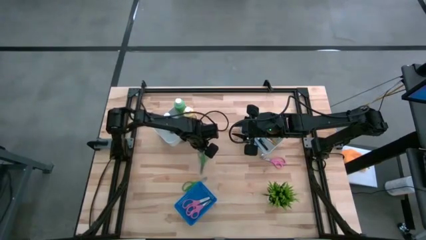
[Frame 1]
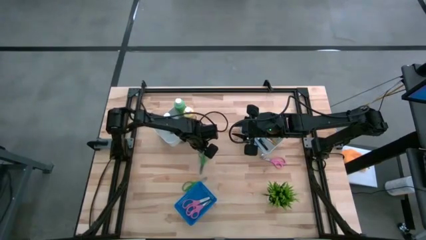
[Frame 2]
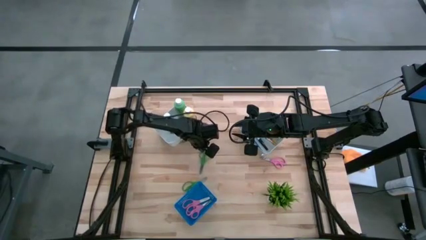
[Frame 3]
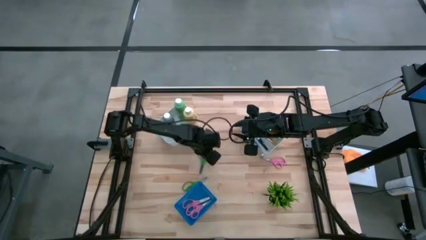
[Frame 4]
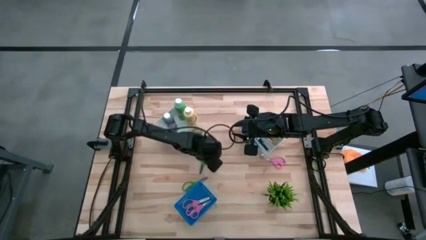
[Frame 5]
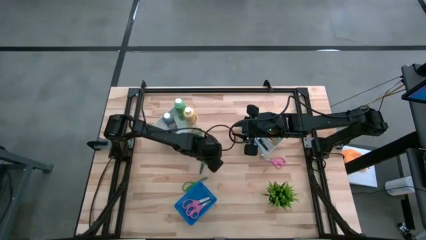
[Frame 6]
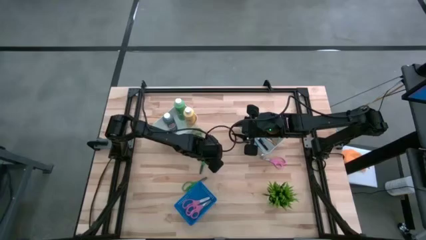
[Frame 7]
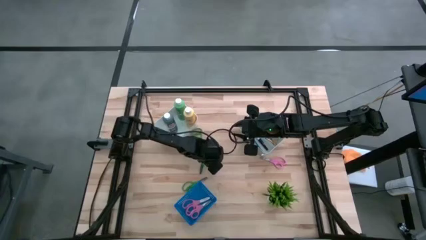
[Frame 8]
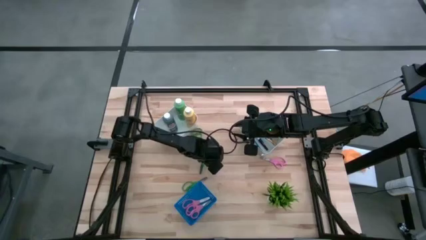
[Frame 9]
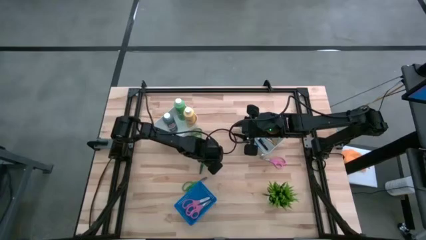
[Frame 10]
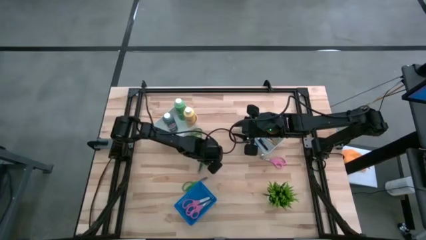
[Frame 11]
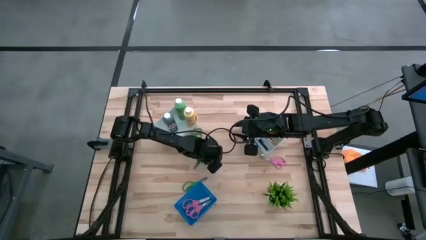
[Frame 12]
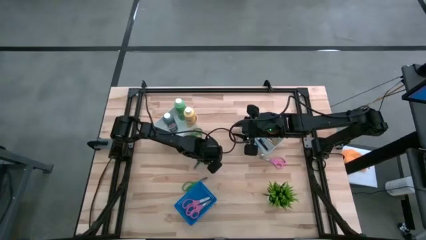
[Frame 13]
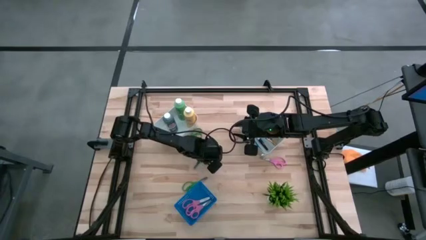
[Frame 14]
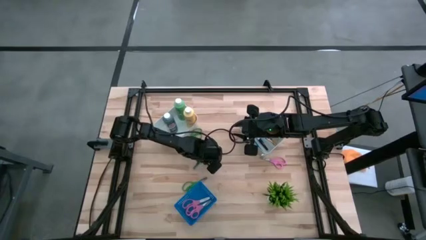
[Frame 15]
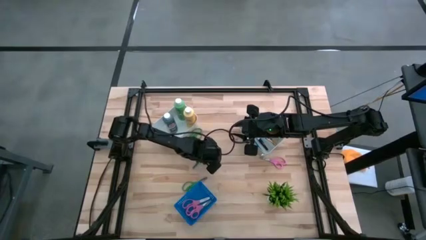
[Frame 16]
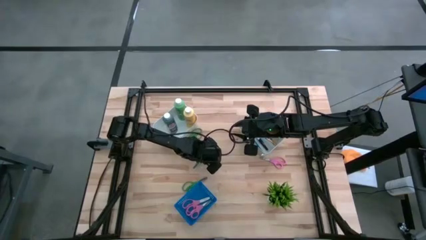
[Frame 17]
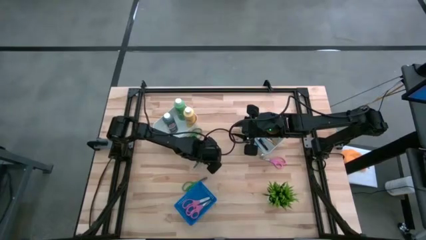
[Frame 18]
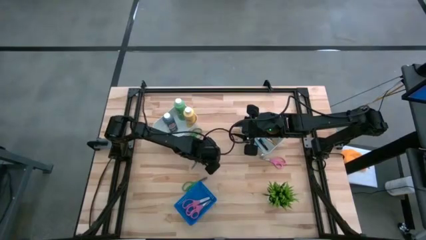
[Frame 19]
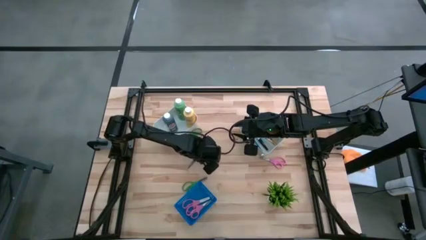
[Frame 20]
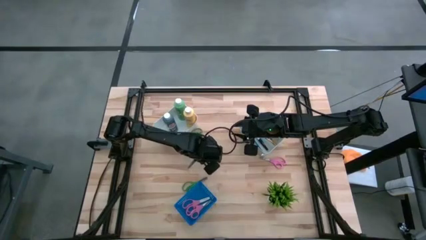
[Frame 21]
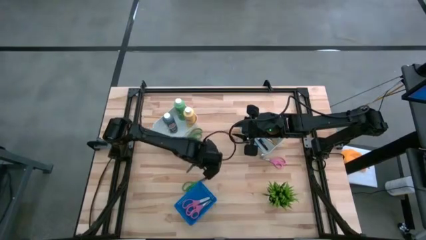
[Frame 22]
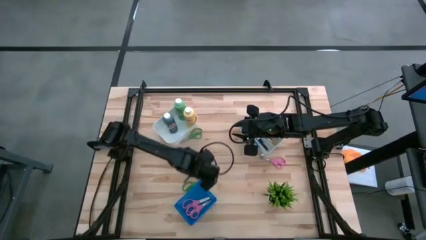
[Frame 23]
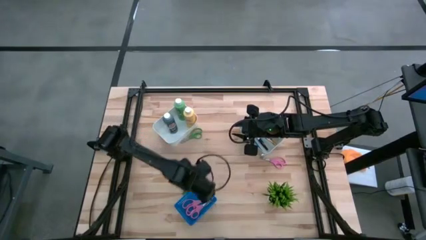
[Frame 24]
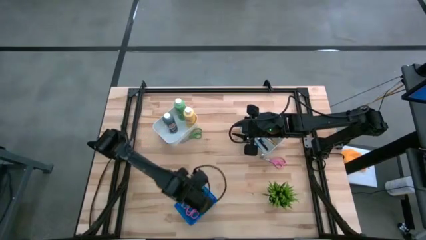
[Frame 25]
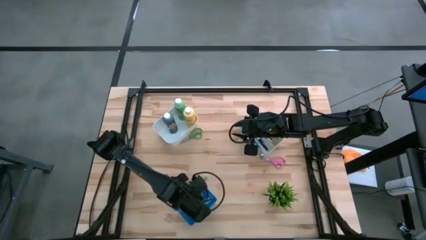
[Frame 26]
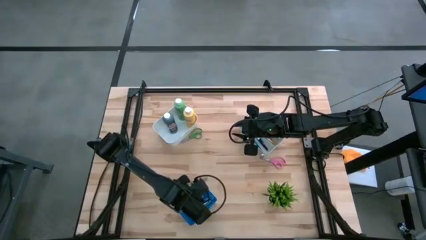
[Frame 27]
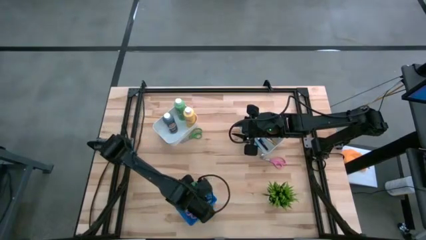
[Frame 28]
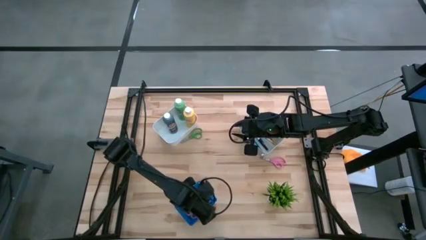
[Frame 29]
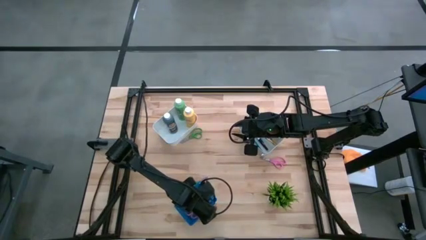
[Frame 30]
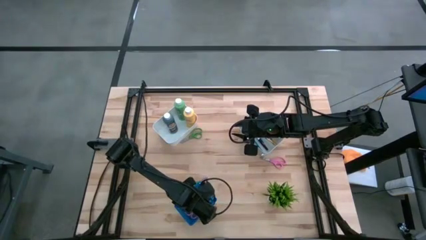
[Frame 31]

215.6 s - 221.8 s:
Task: Pick & Place Paint Supplies
Put the green scissors into the blue bin

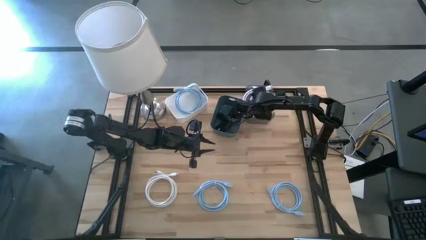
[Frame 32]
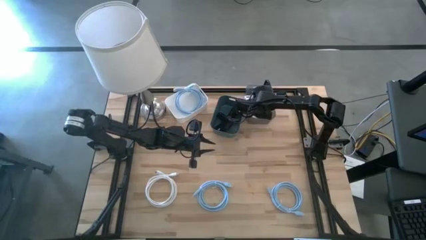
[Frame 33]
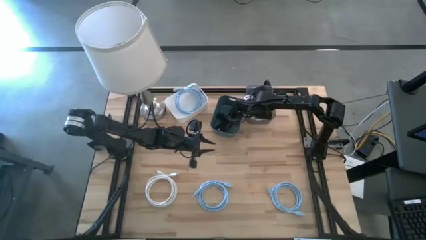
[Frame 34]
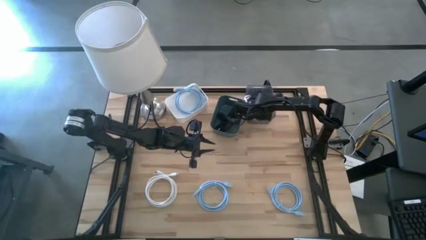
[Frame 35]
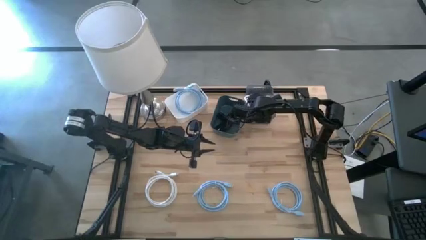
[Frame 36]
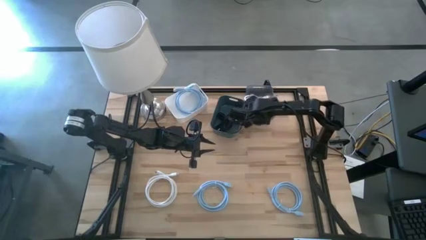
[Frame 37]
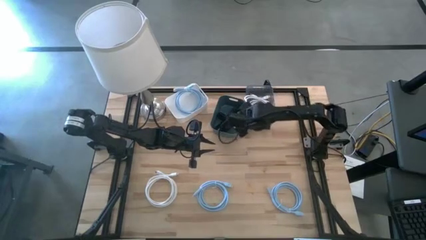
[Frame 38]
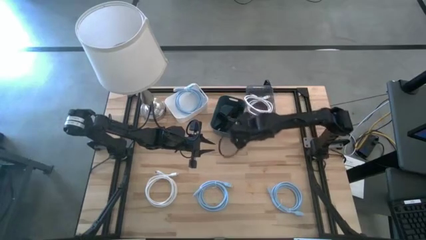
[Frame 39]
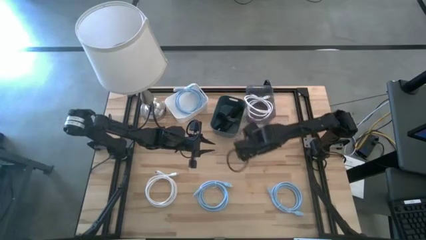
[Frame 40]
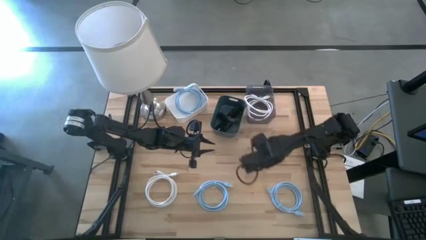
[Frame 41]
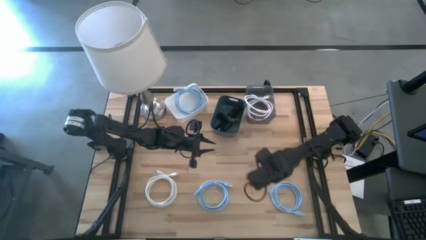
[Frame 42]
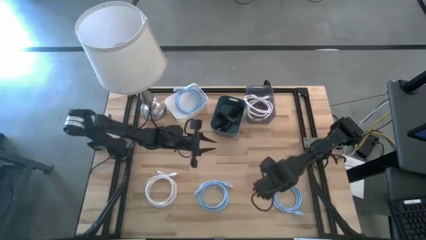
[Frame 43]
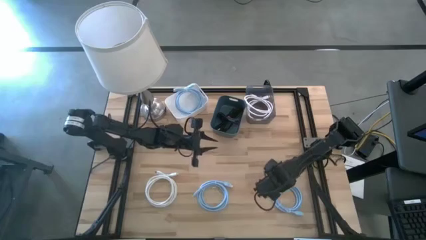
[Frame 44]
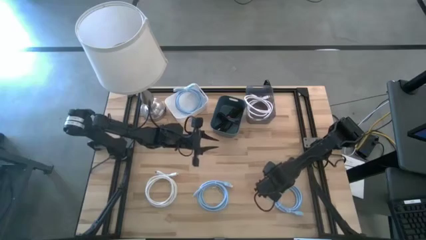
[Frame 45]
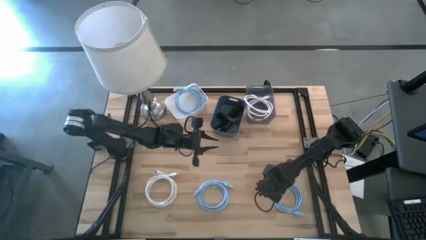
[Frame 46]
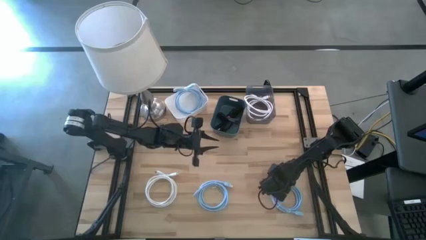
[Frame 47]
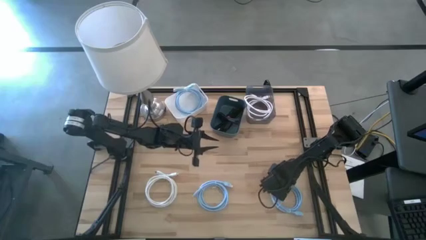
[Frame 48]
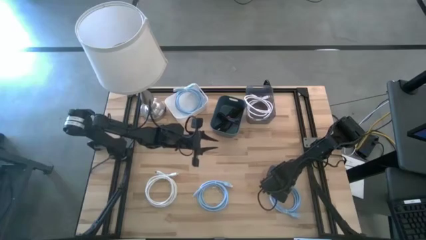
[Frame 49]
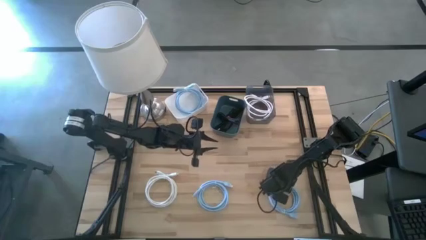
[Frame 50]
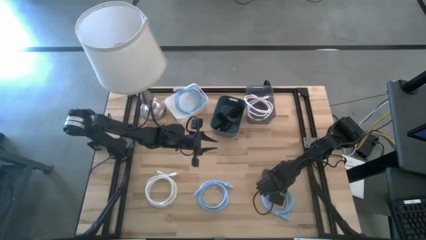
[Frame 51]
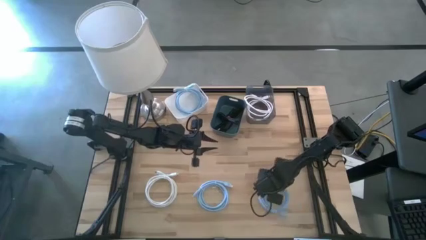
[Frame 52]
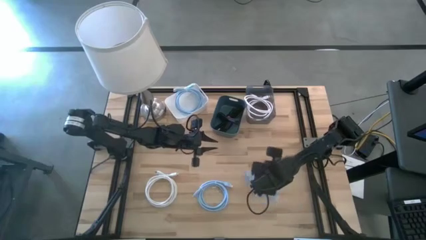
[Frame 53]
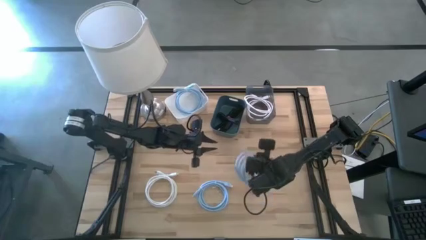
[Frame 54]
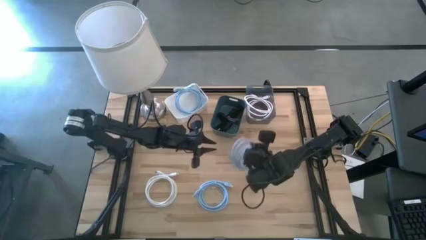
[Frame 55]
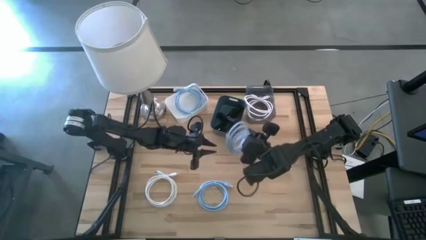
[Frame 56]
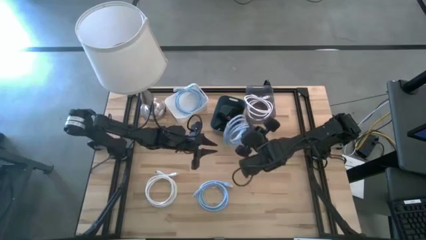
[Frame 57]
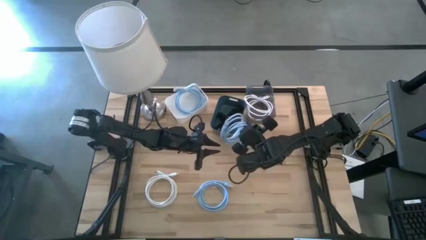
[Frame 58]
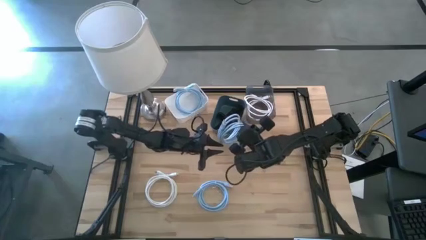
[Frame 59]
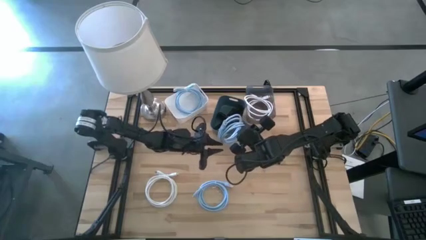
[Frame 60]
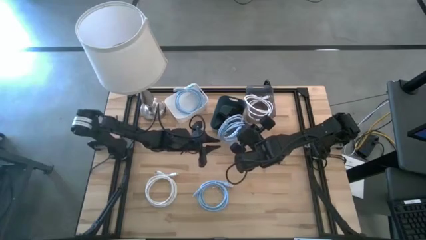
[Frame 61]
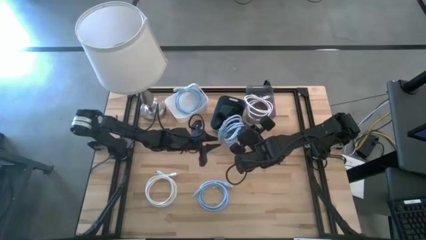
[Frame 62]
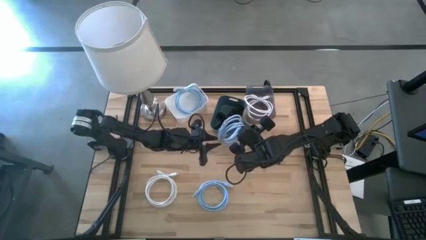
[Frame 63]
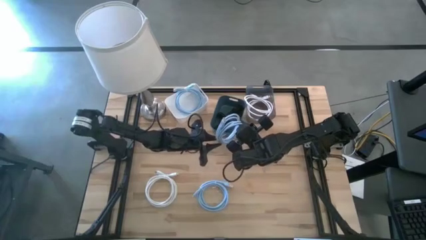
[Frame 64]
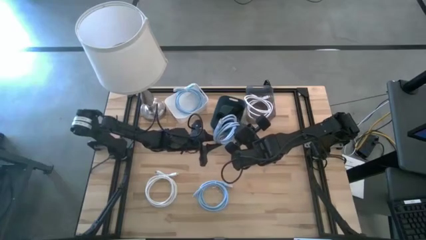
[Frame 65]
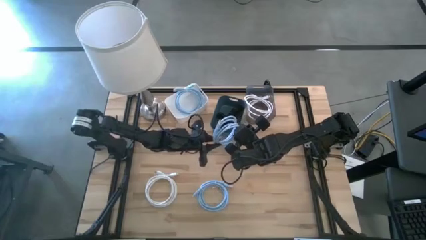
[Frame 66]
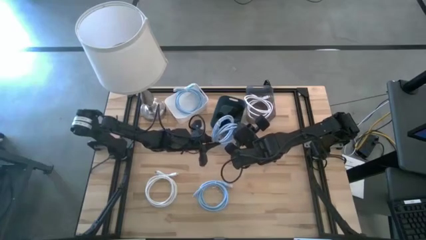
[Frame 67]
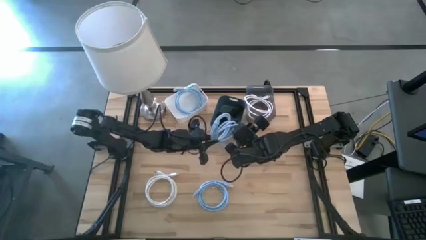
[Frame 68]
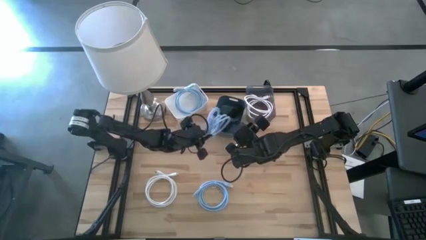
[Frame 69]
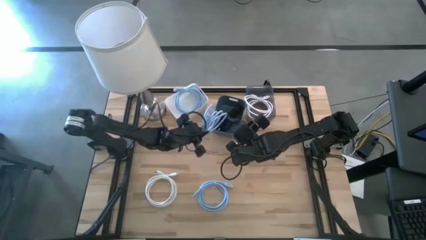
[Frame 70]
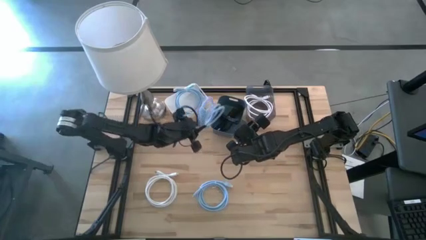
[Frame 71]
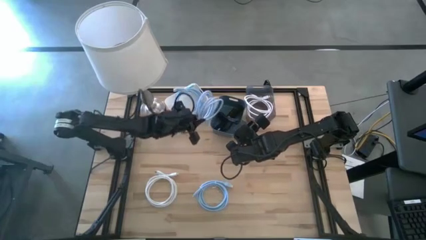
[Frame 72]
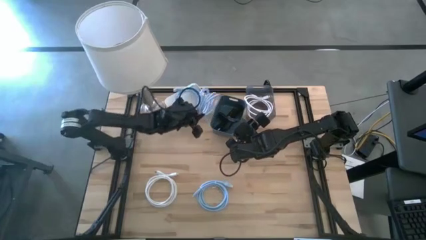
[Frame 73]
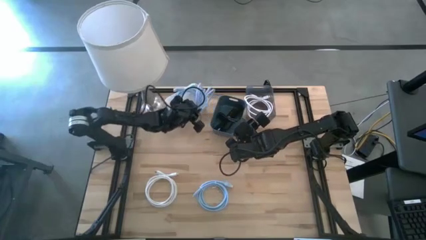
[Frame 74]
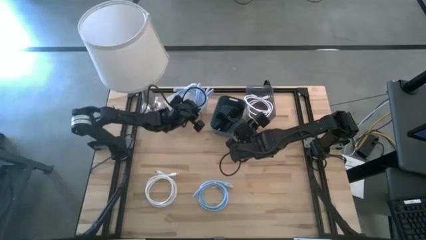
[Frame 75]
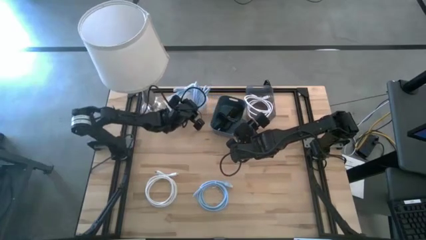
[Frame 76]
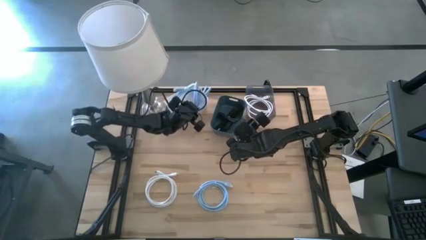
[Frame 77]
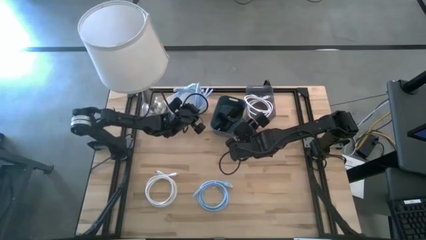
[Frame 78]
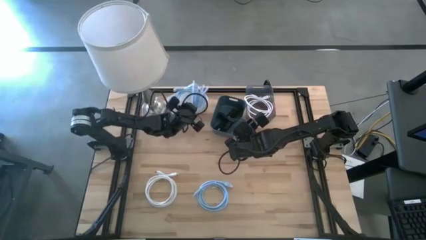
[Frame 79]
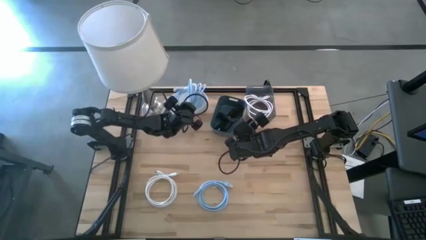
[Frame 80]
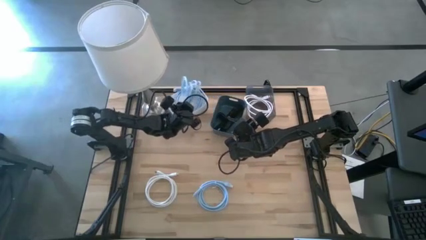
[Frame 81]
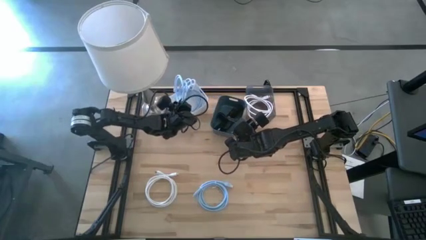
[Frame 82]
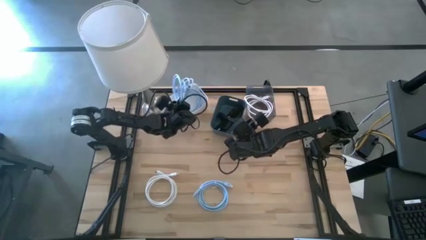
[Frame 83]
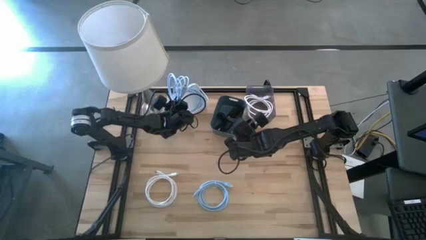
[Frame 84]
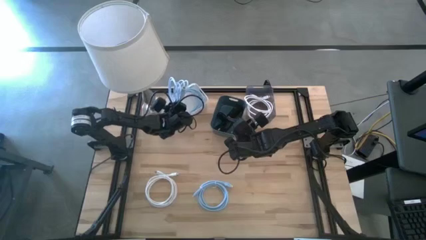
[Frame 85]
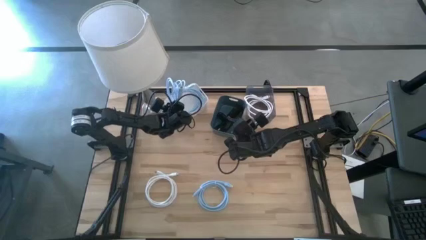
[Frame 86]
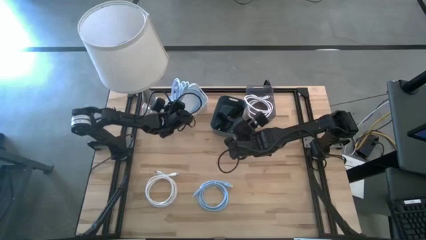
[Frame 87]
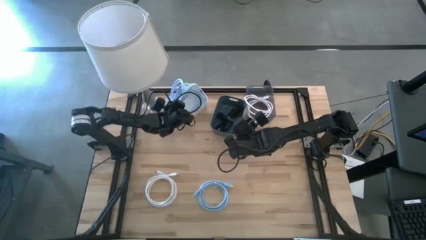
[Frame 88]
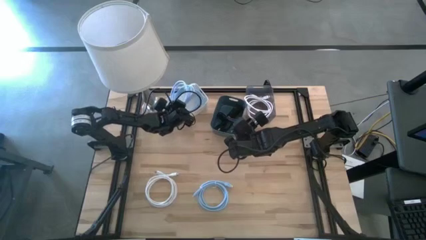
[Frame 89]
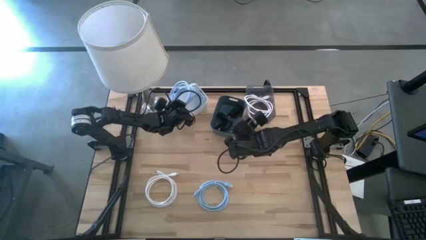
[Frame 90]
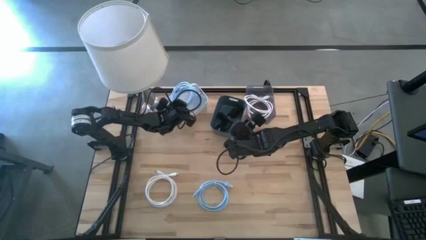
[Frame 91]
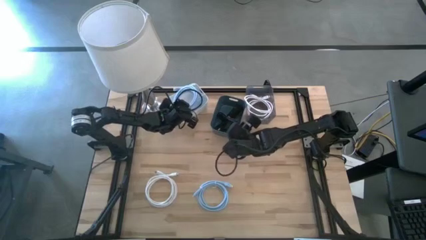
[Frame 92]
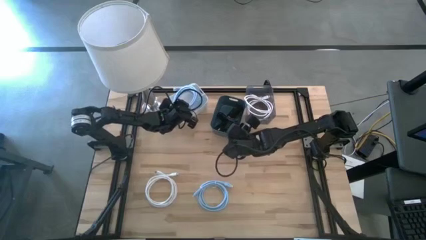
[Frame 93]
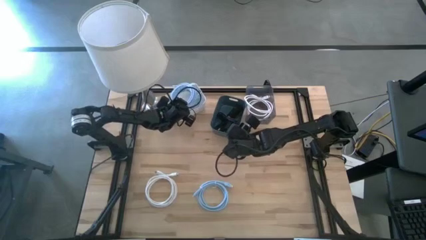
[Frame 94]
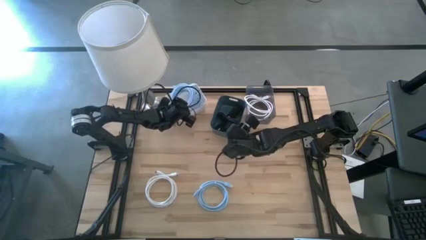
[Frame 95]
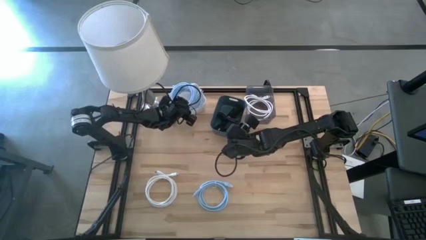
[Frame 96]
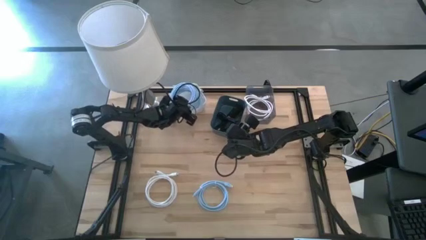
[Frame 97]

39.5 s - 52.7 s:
Task: Pick & Place USB Port
Put the right blue cable into the white bin
